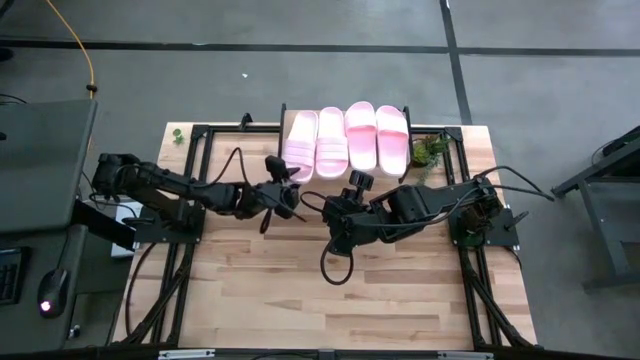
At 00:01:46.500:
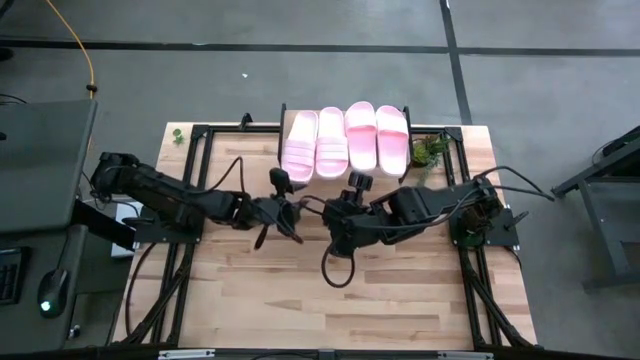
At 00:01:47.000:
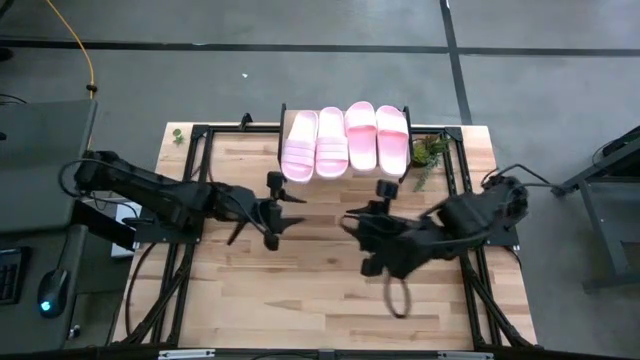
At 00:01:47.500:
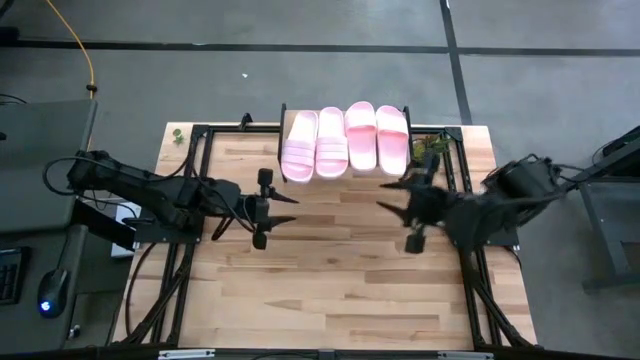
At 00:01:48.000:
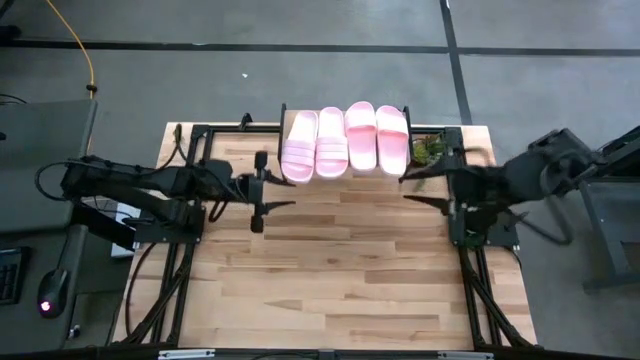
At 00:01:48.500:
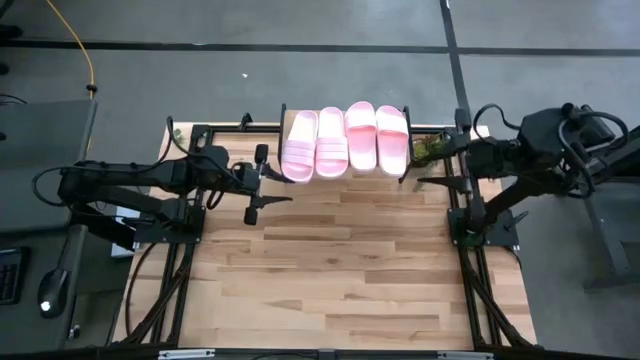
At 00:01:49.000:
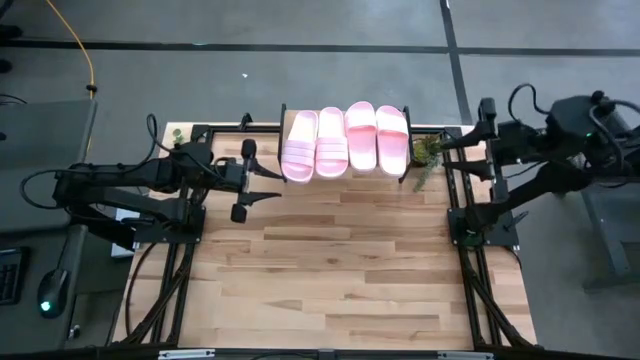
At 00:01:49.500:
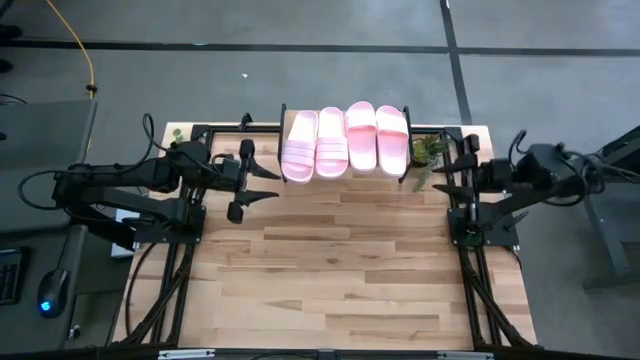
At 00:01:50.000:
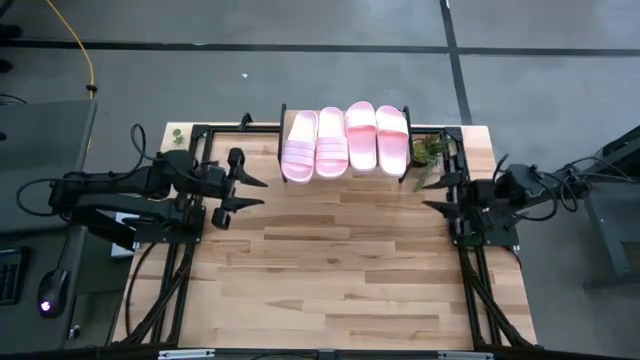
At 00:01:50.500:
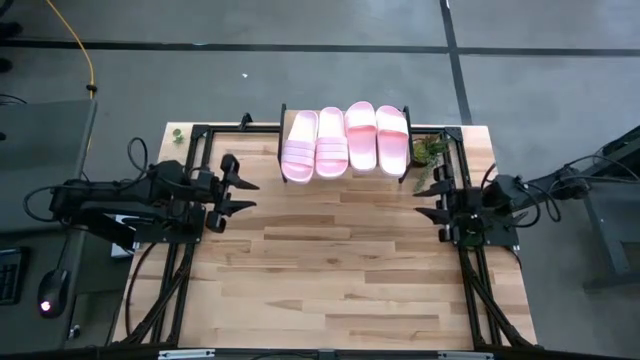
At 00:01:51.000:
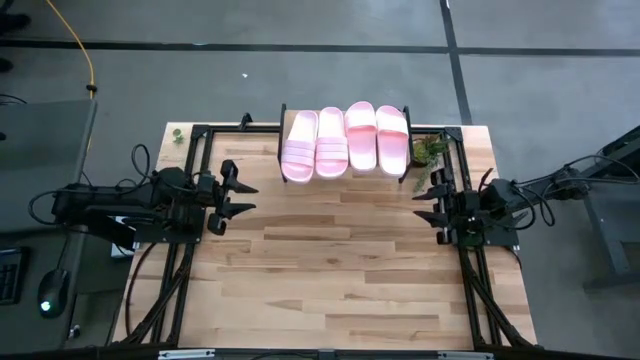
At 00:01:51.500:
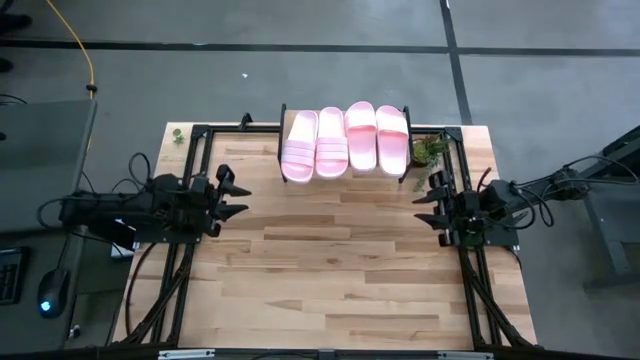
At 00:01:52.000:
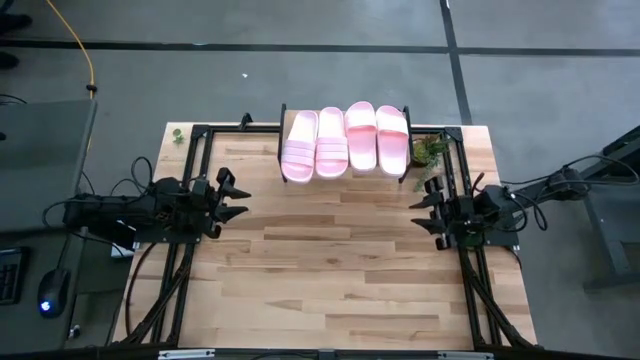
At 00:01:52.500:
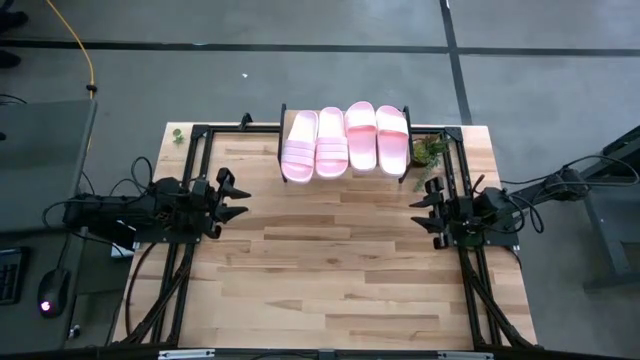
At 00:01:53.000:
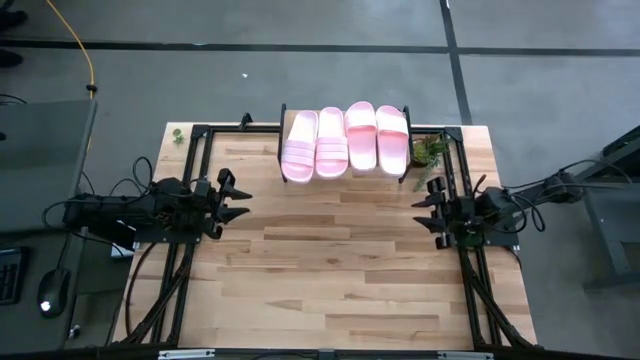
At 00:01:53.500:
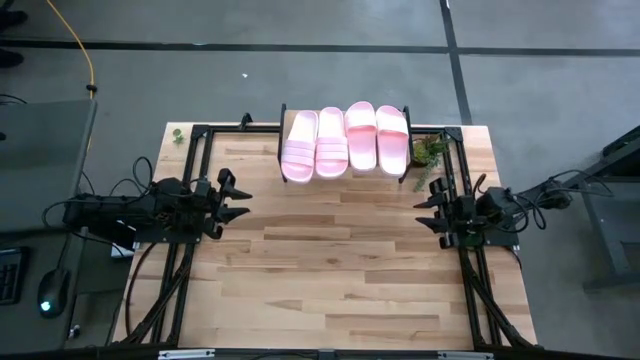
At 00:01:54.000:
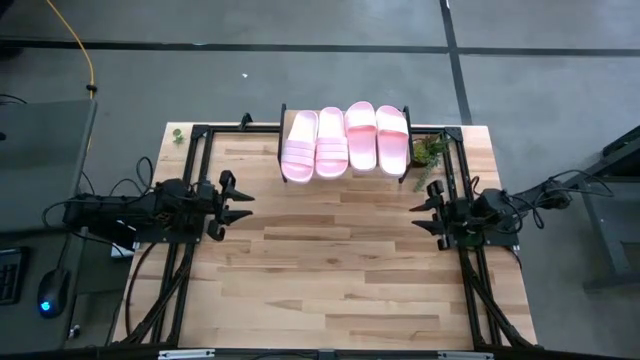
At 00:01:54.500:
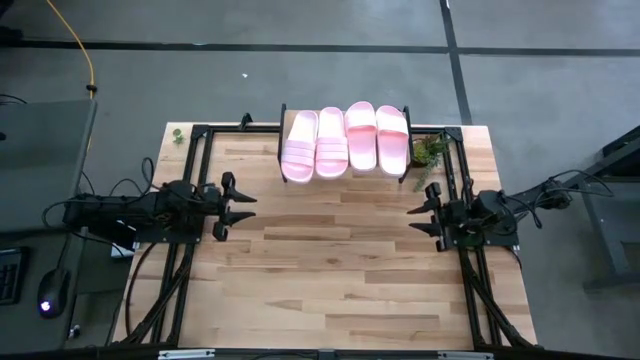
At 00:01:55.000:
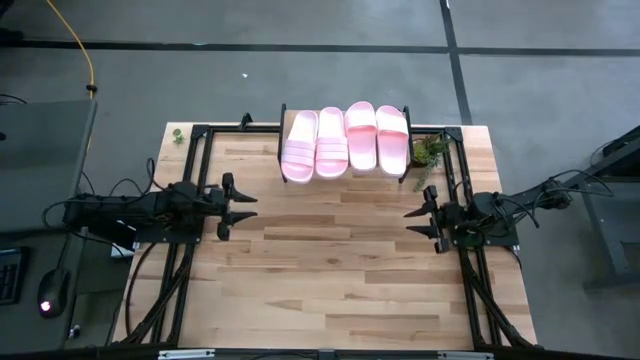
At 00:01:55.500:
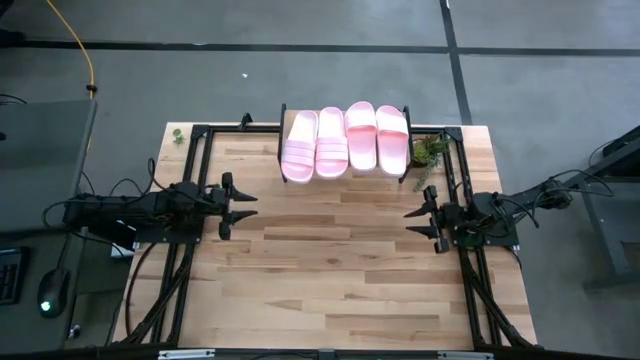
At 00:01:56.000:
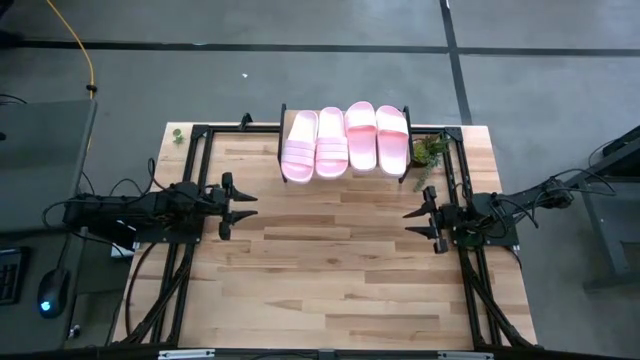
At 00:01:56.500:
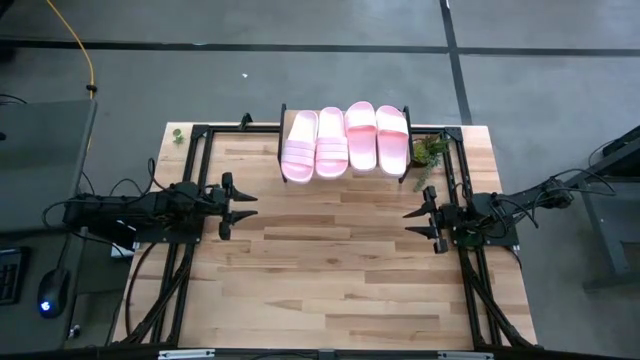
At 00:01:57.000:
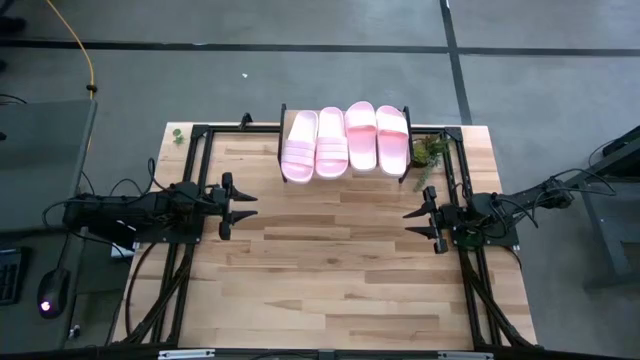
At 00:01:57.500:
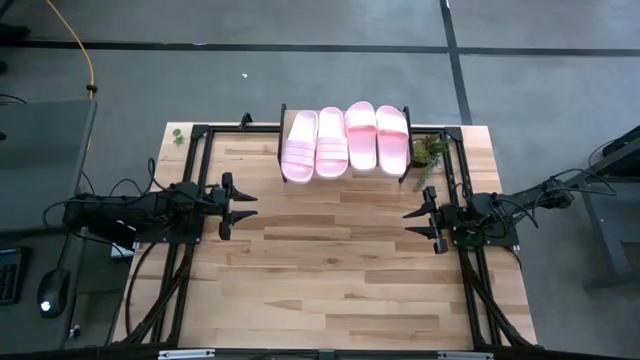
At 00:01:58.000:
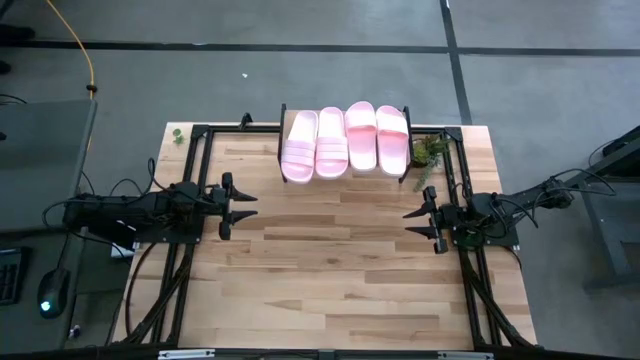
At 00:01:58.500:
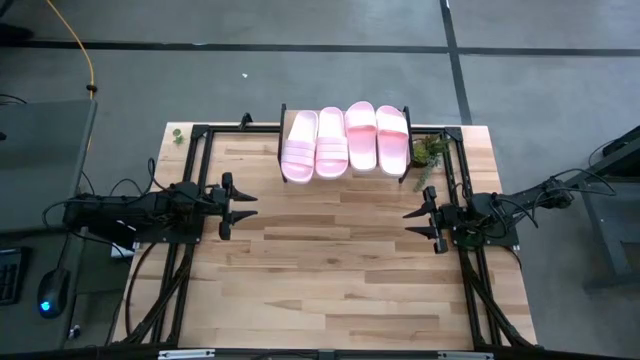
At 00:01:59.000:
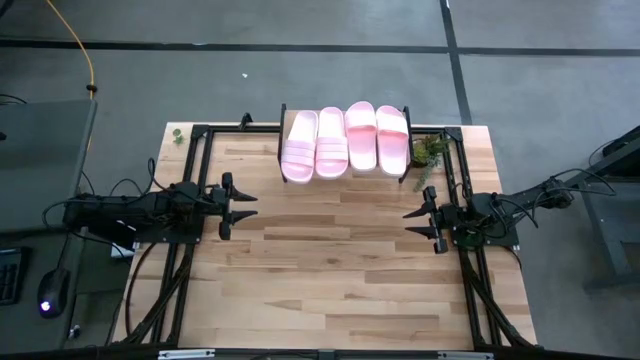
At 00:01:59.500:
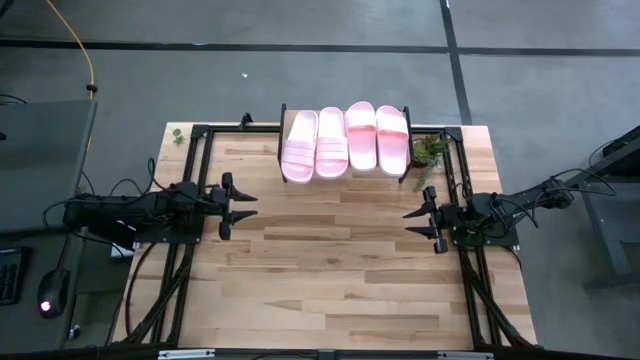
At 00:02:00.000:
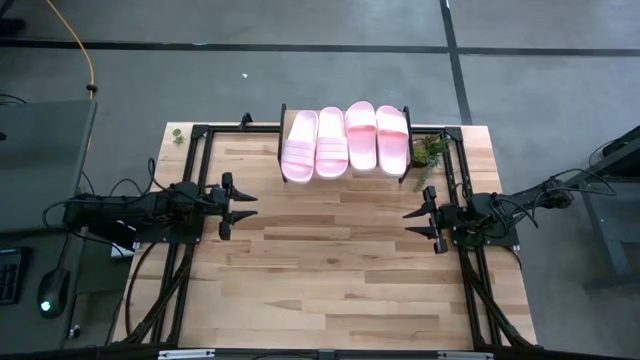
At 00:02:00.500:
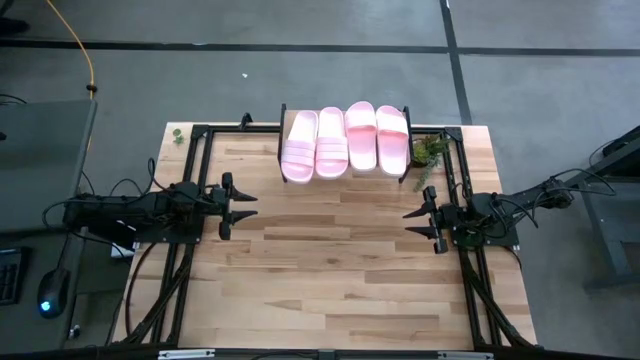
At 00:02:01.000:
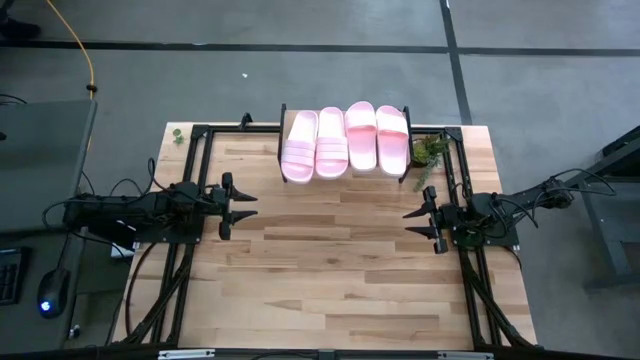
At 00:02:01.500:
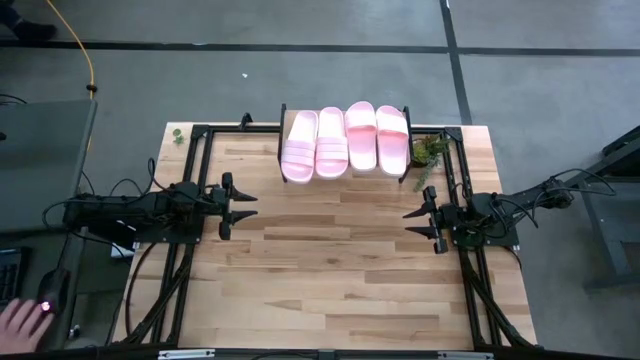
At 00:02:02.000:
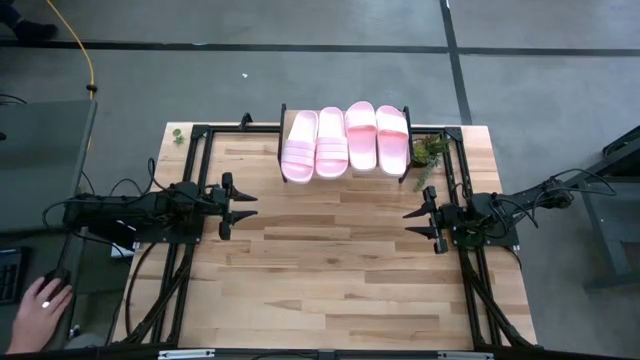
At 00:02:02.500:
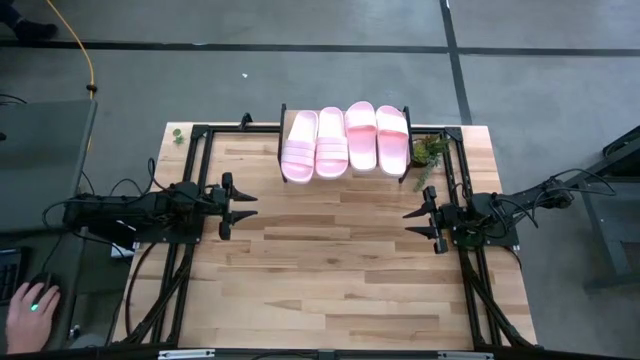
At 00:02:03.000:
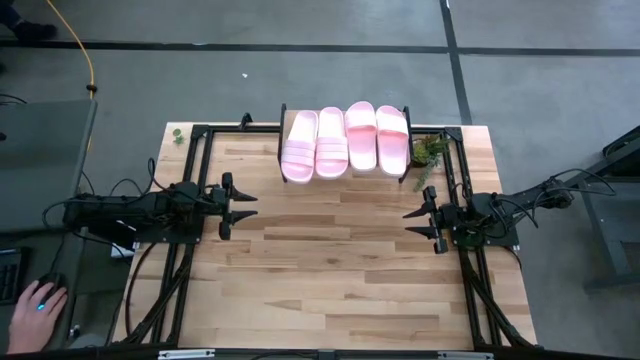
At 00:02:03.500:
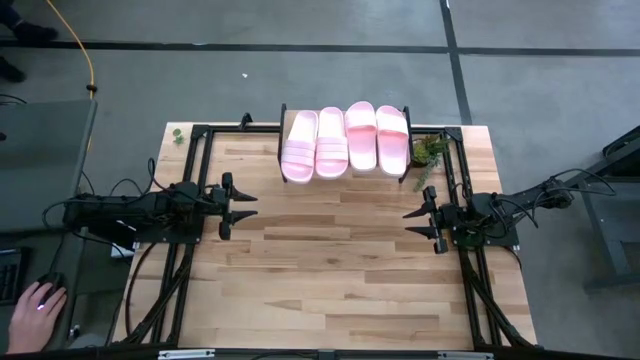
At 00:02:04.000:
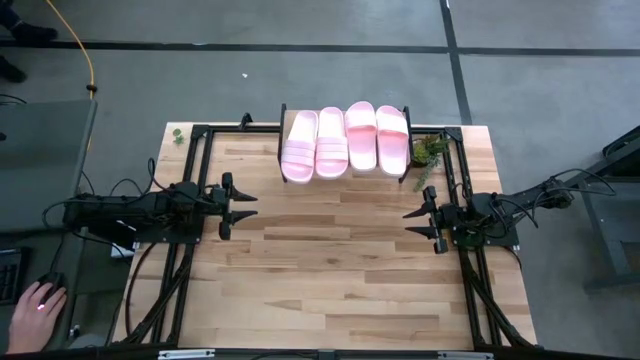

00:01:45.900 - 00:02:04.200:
Task: Pick and place slides into the shelf
Return to Home Position
